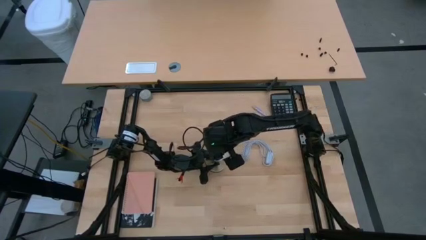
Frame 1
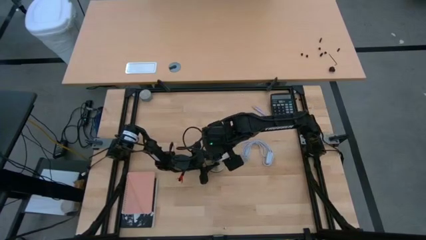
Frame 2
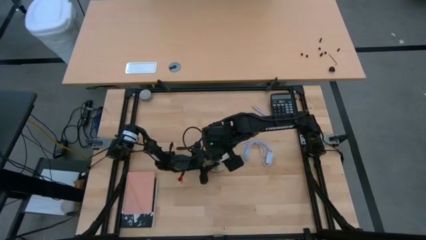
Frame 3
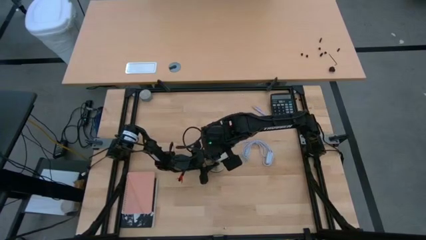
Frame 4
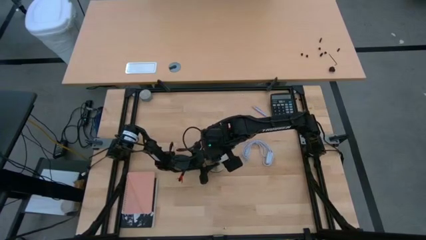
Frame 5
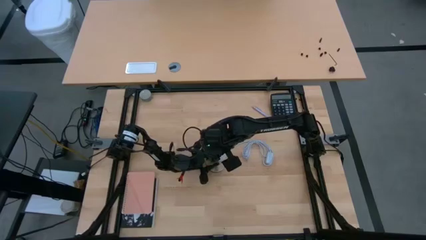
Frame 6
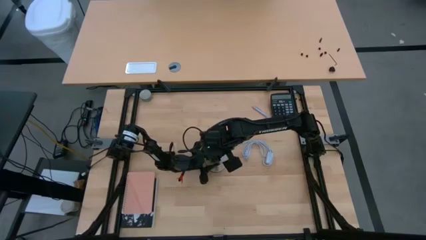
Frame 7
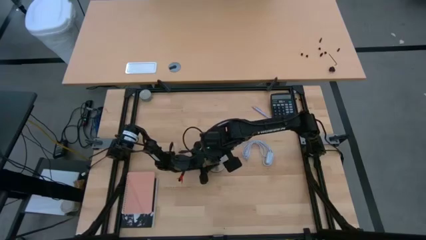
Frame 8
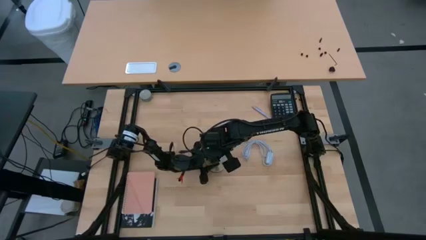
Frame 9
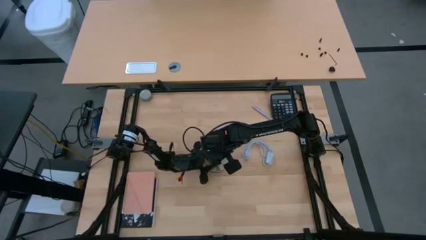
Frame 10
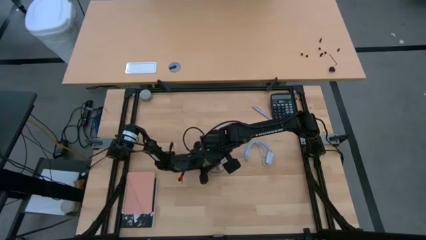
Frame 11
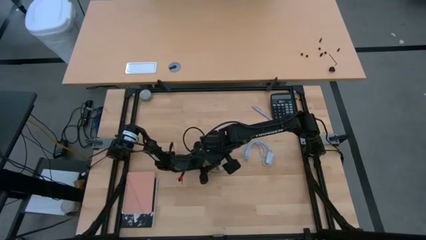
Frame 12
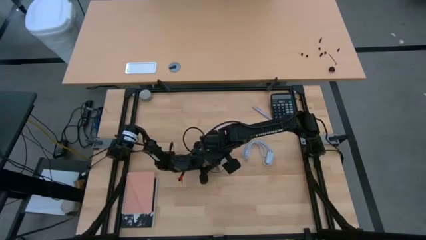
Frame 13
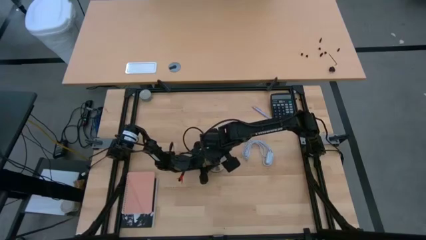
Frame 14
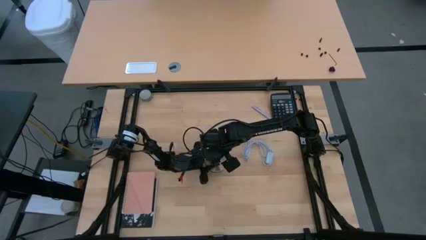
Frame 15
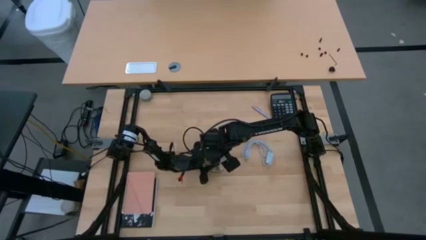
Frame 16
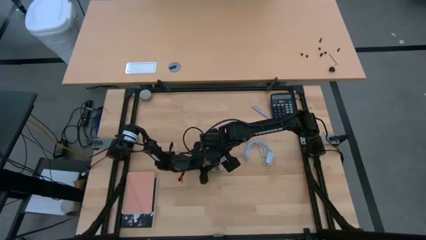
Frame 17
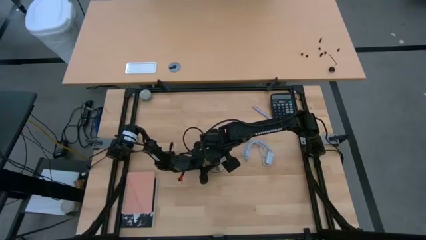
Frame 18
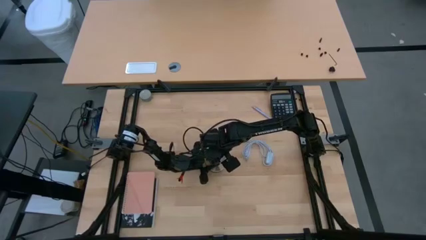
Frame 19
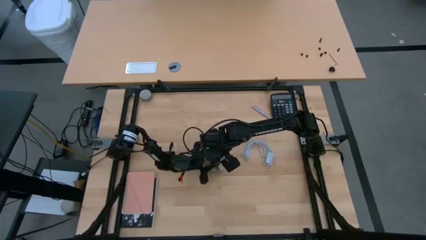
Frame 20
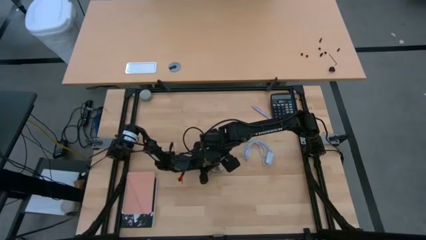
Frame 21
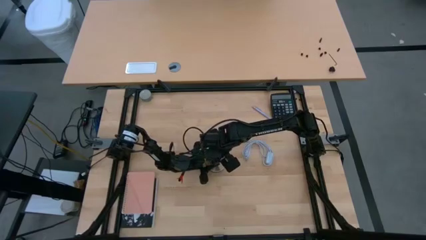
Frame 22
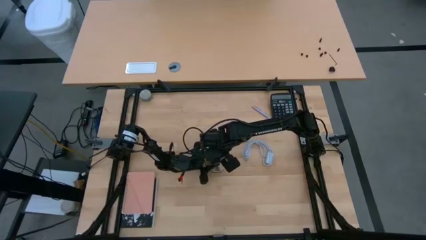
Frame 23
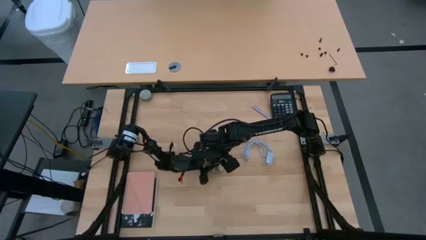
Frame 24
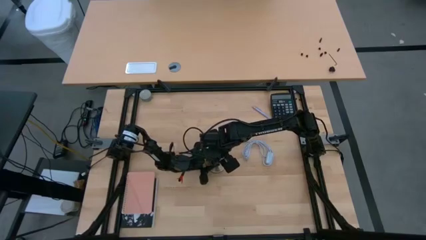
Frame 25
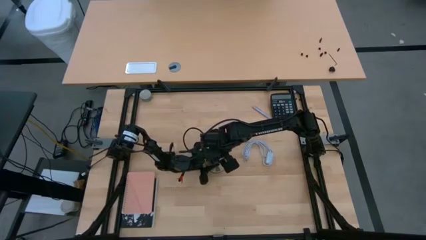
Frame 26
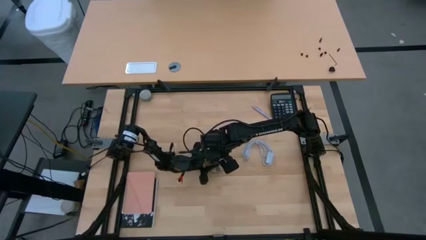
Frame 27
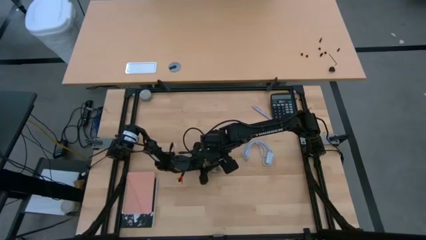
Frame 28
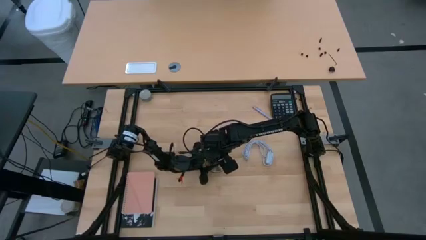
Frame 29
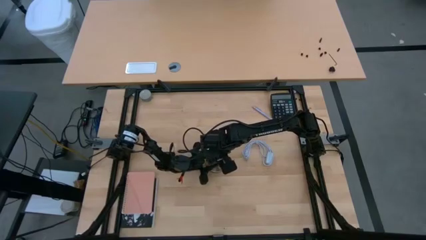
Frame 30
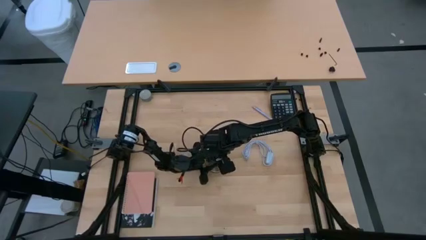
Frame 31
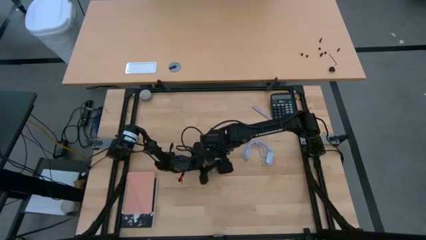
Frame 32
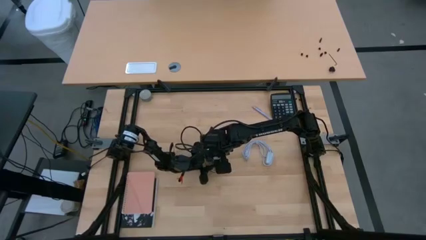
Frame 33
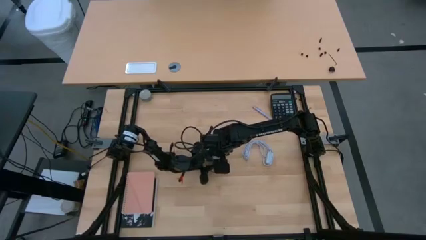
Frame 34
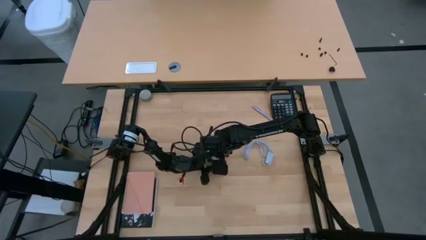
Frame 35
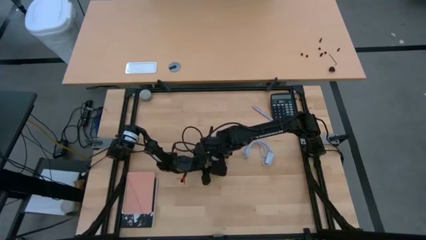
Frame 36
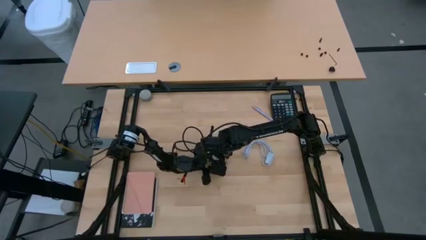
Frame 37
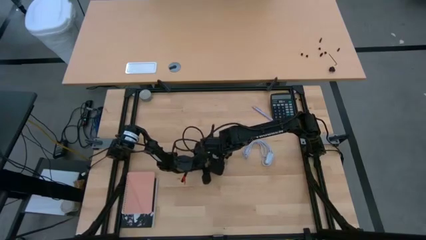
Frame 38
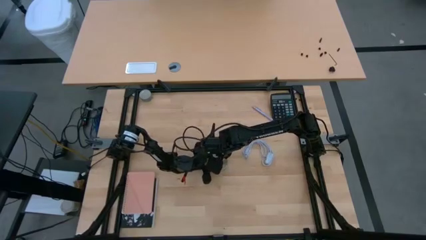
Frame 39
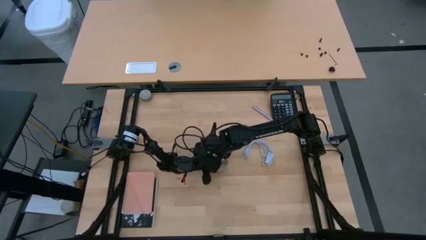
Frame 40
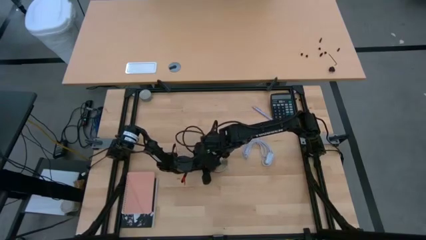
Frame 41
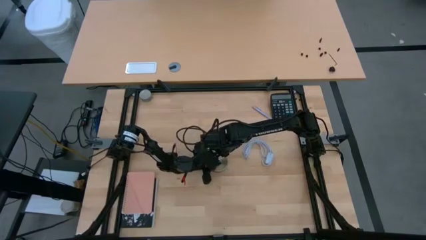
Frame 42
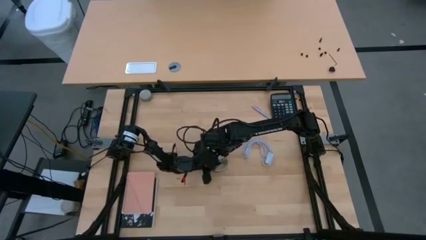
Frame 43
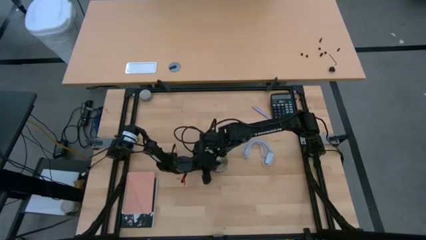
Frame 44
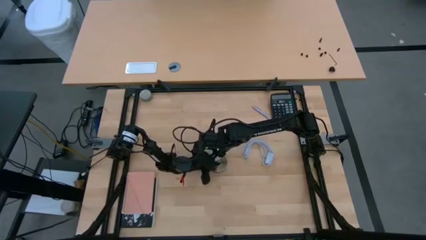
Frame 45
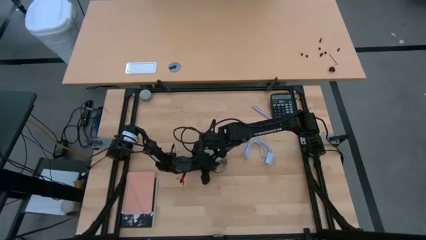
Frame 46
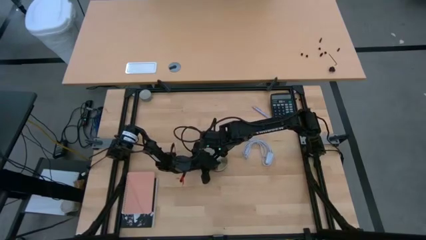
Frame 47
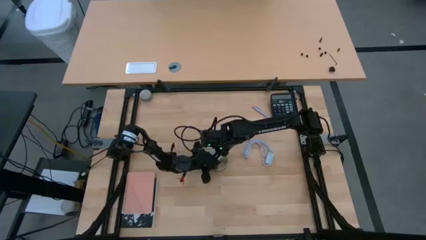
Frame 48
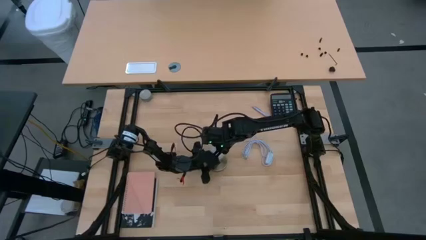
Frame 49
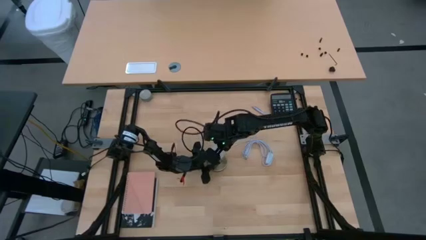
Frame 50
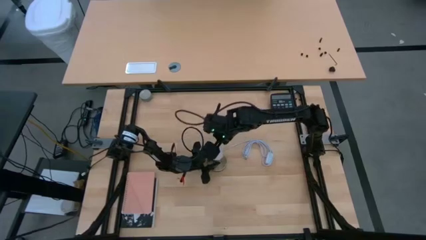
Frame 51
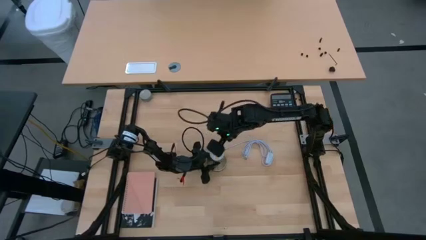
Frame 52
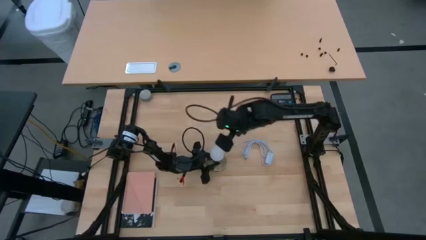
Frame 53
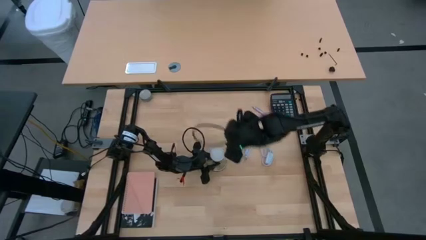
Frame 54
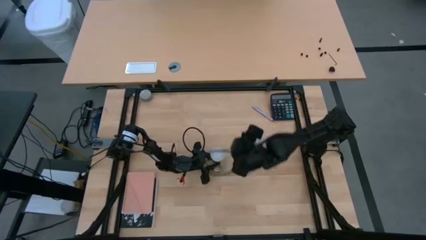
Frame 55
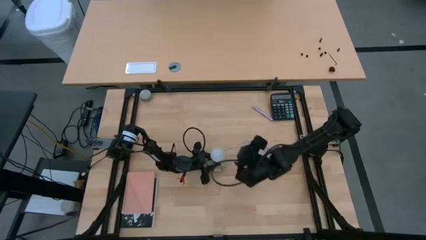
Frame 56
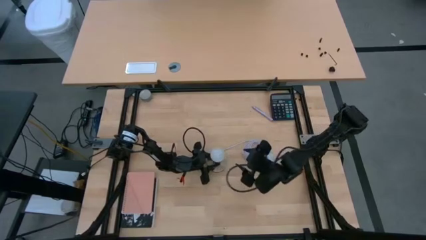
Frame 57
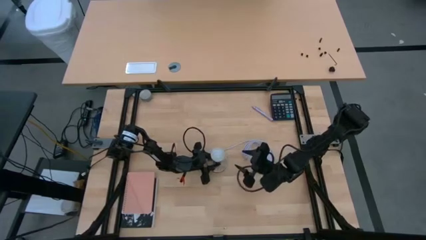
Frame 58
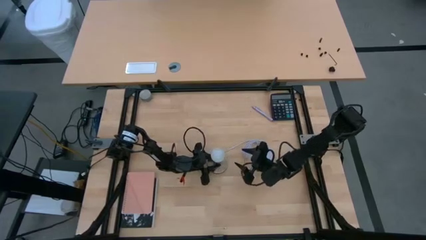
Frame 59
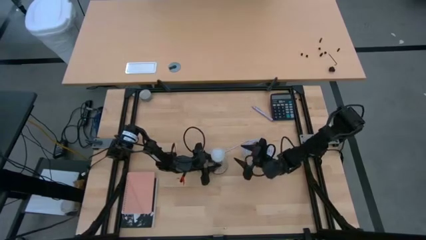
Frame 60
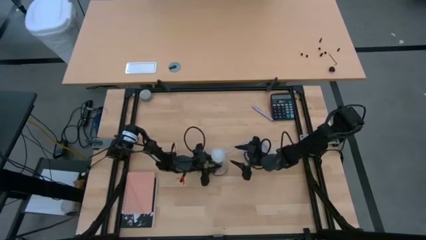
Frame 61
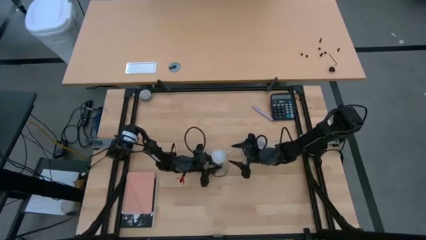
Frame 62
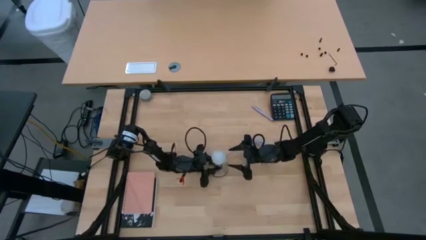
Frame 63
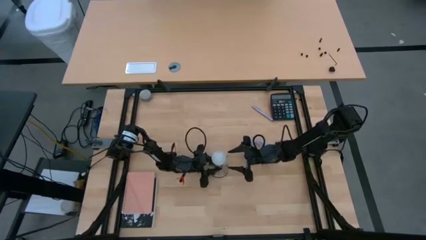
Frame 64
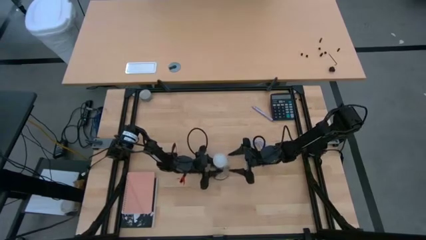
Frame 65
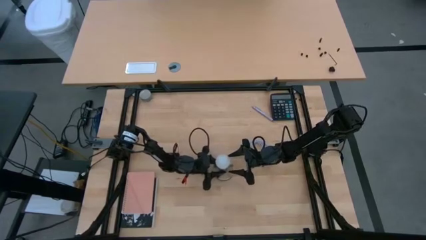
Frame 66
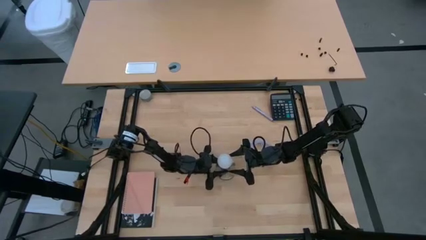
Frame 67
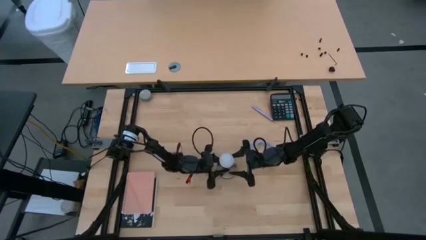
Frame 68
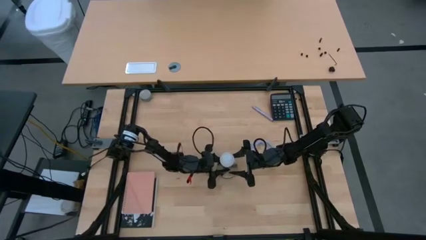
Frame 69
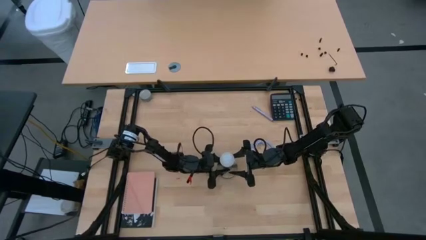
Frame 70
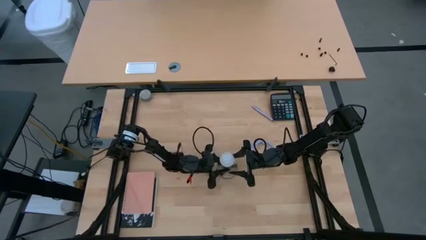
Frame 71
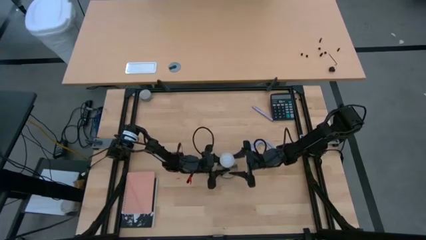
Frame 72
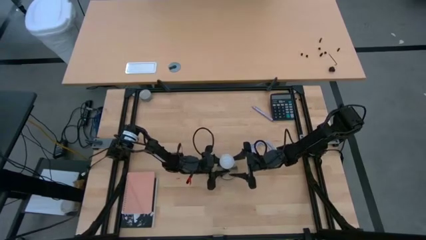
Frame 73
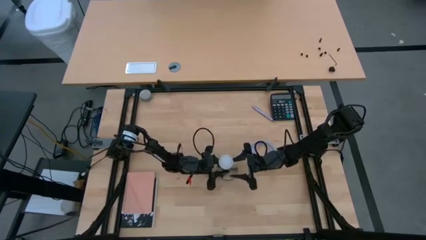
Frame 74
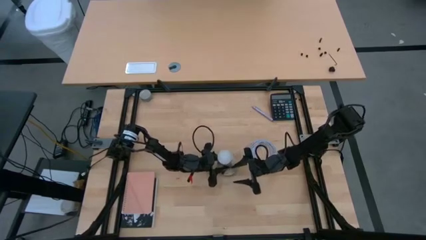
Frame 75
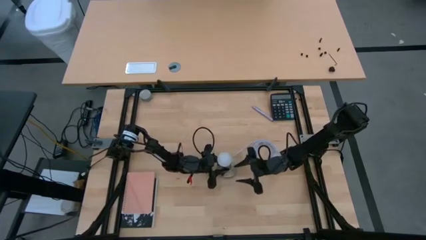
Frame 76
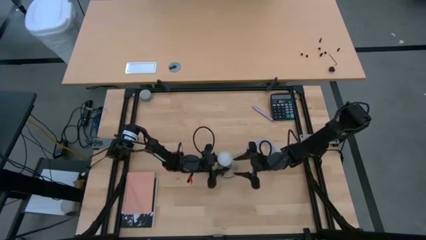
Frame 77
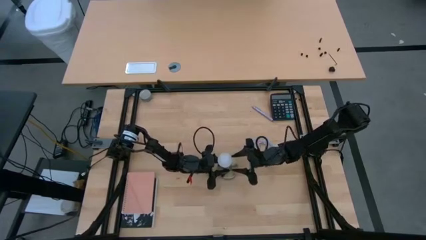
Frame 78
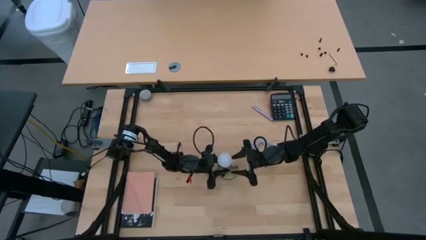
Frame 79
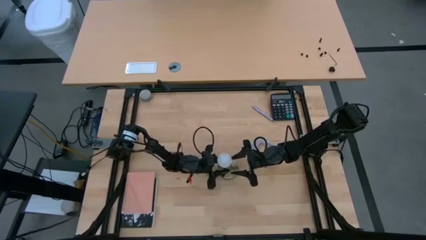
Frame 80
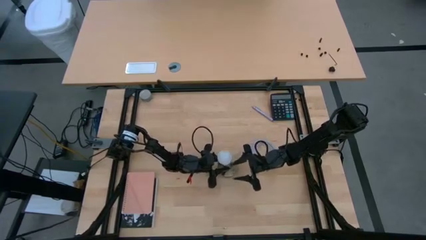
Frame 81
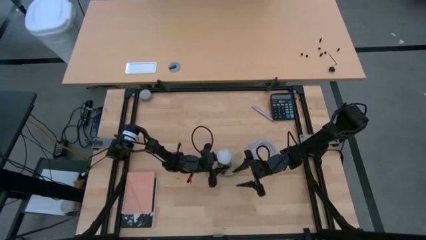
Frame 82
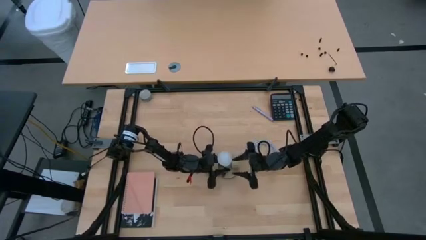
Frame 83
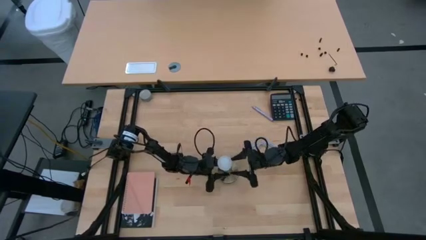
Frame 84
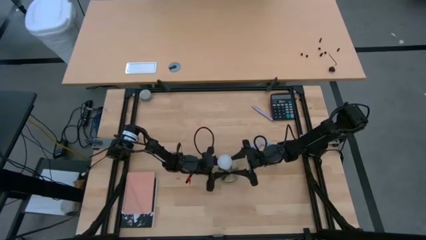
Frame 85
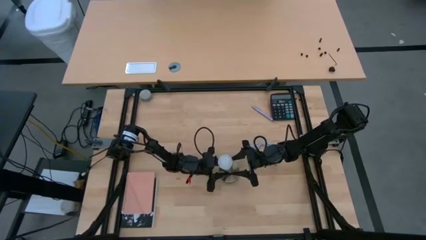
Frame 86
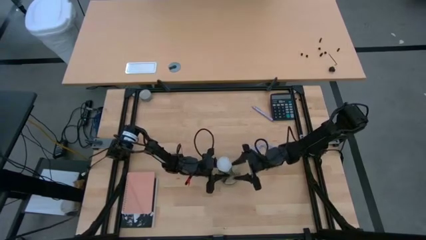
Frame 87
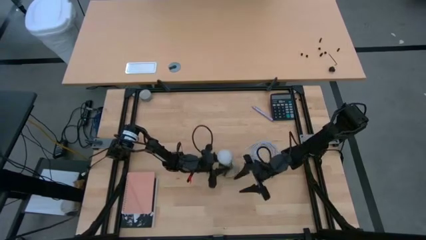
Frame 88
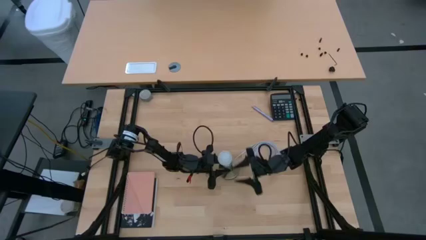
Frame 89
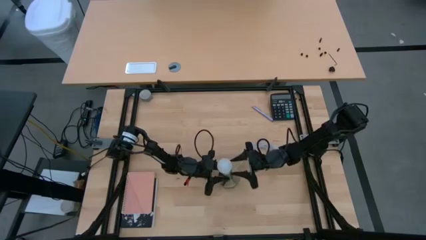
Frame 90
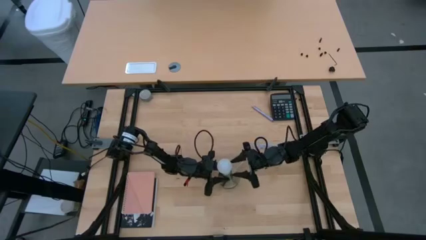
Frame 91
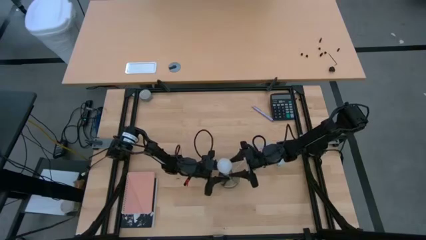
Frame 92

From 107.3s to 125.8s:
Task: Screw lightbulb
Insert the lightbulb on the lamp
